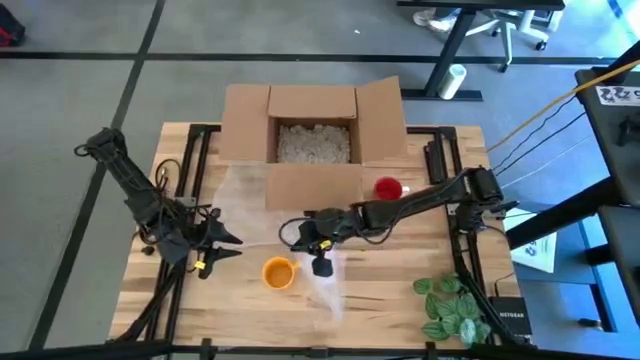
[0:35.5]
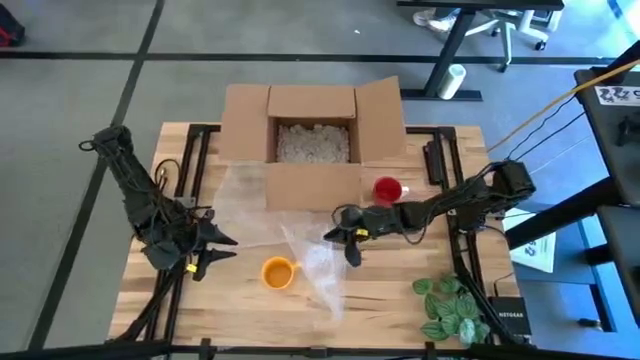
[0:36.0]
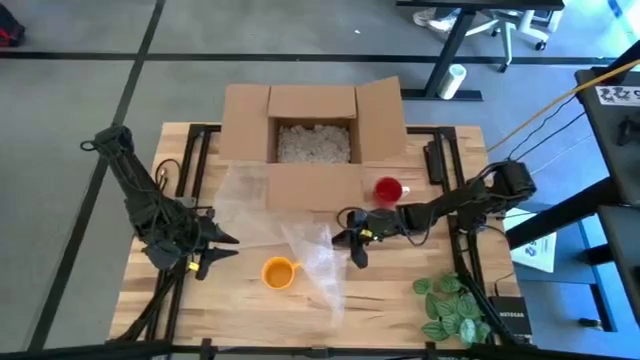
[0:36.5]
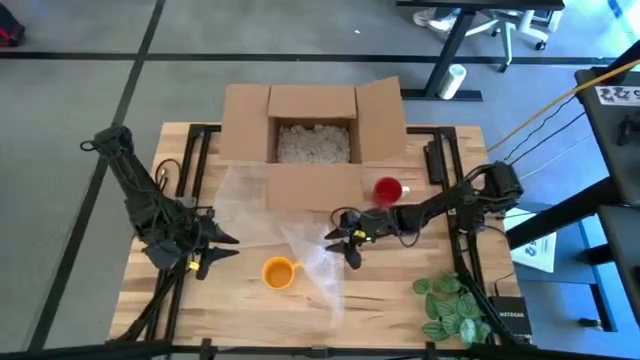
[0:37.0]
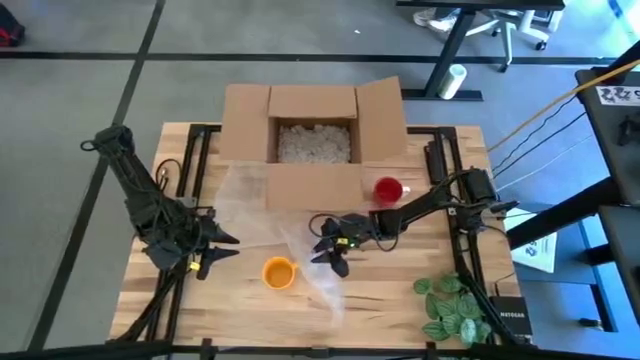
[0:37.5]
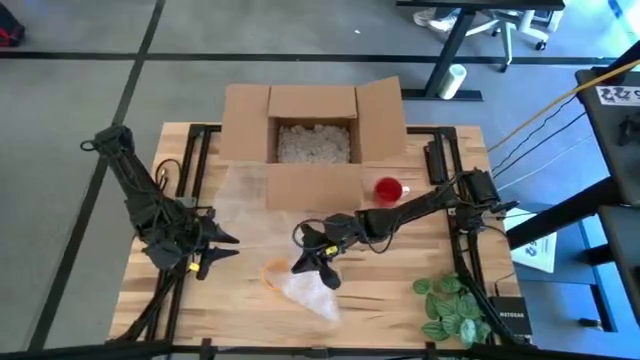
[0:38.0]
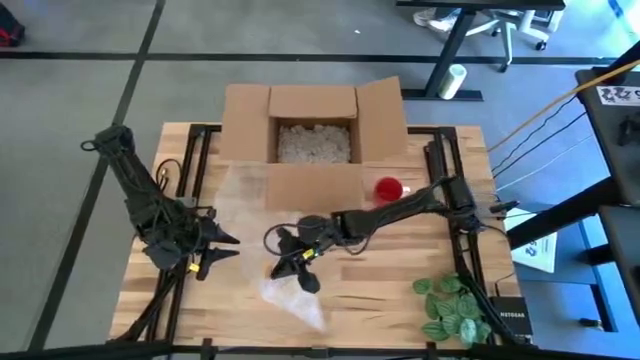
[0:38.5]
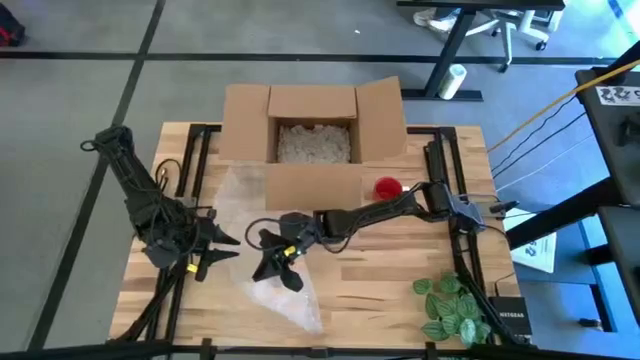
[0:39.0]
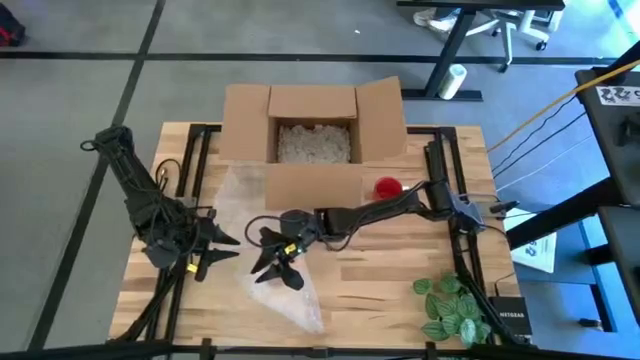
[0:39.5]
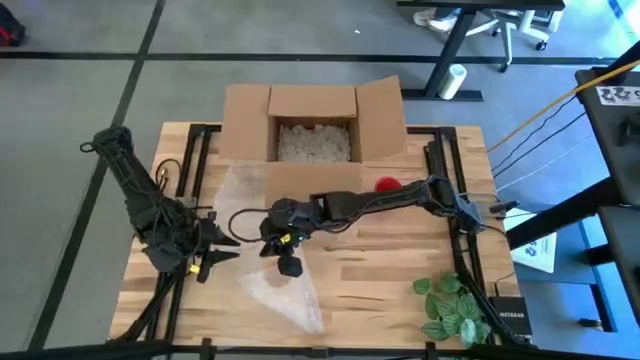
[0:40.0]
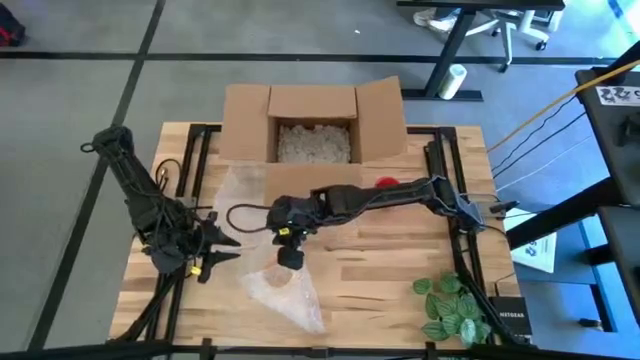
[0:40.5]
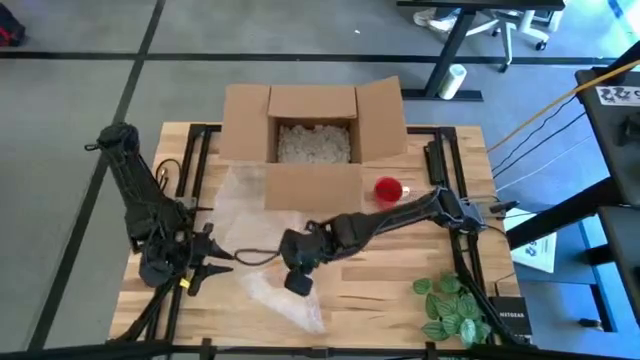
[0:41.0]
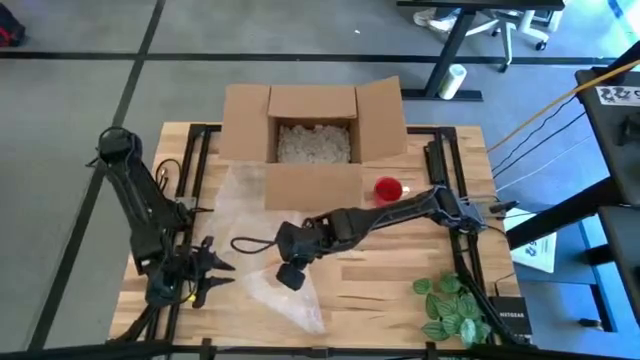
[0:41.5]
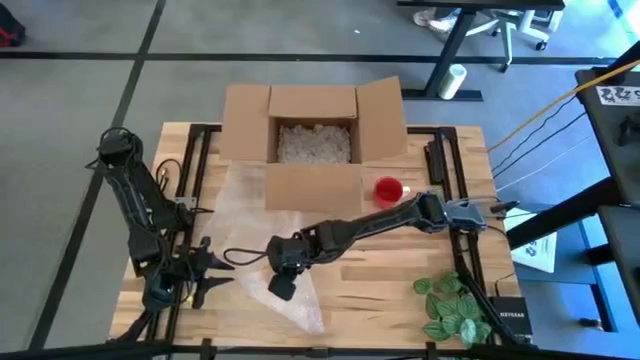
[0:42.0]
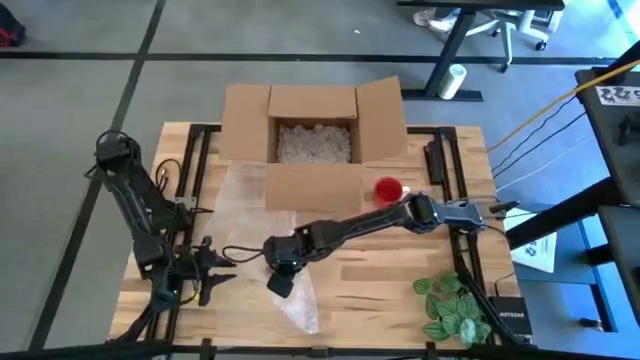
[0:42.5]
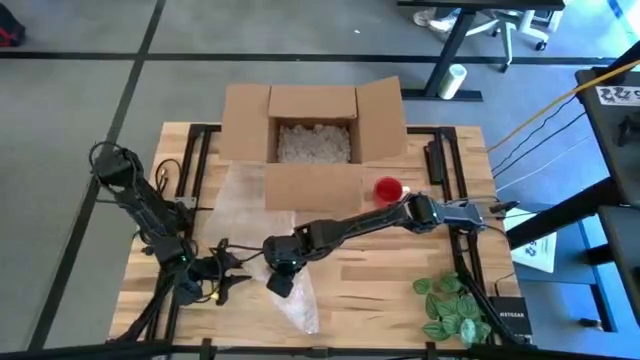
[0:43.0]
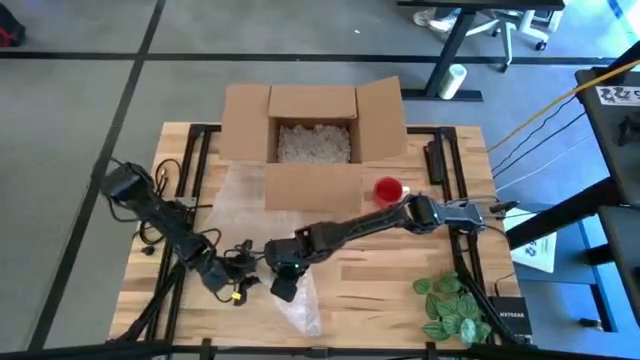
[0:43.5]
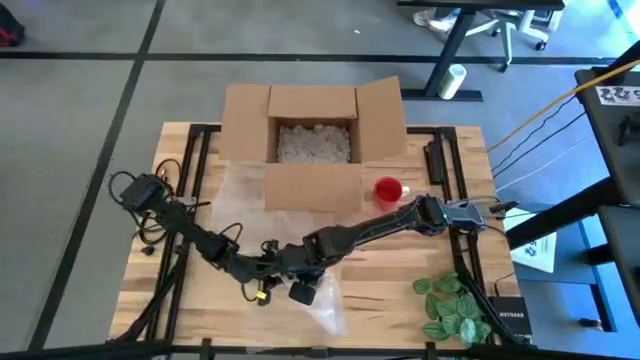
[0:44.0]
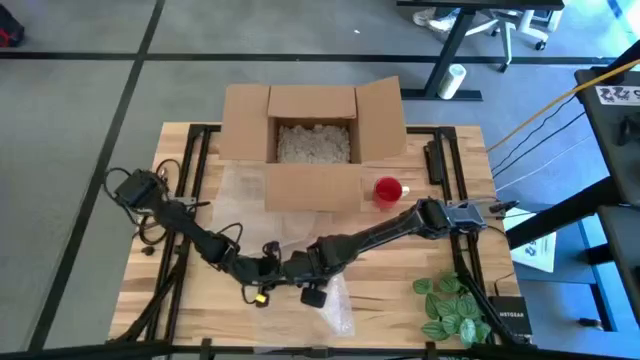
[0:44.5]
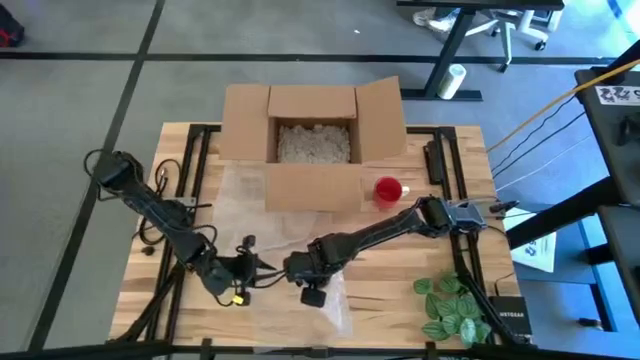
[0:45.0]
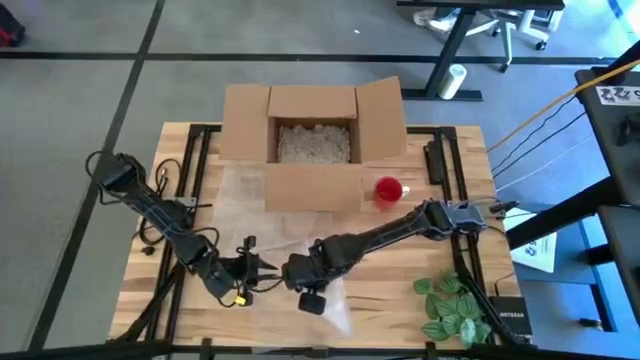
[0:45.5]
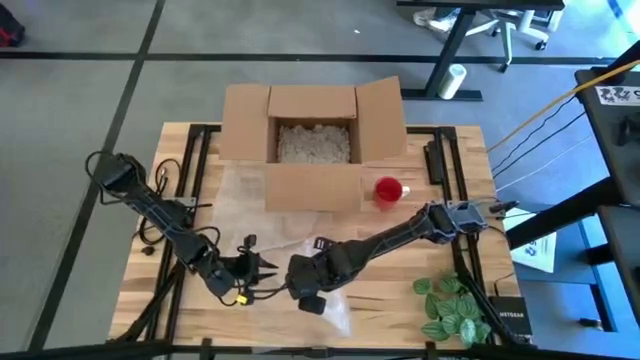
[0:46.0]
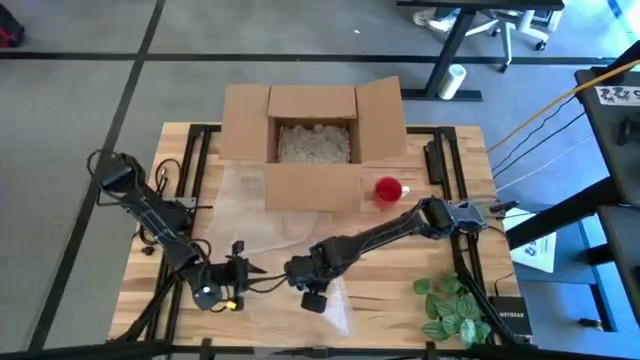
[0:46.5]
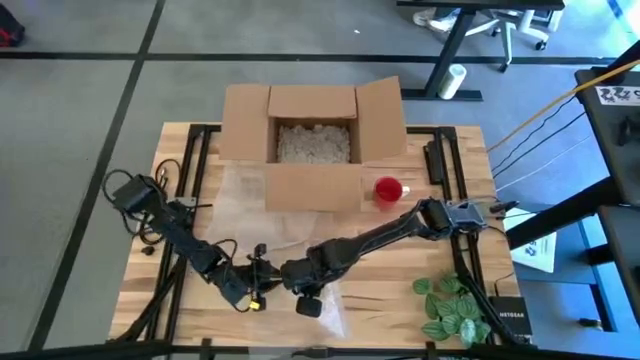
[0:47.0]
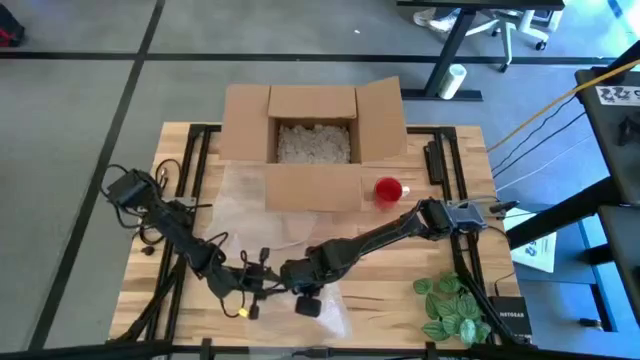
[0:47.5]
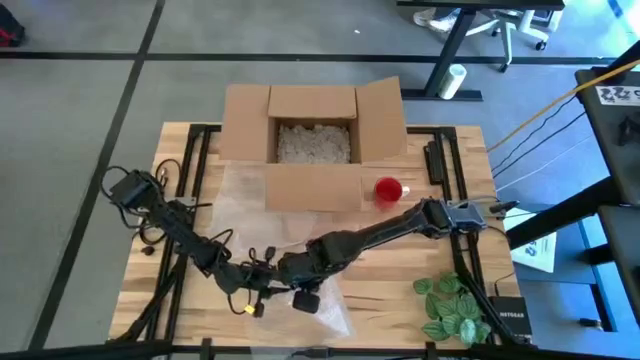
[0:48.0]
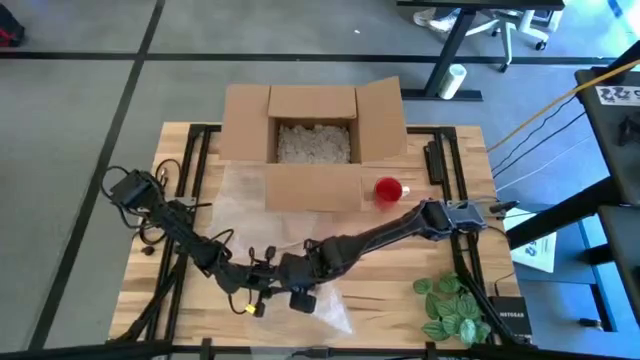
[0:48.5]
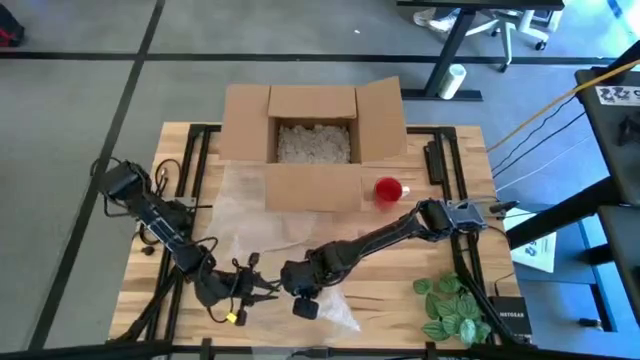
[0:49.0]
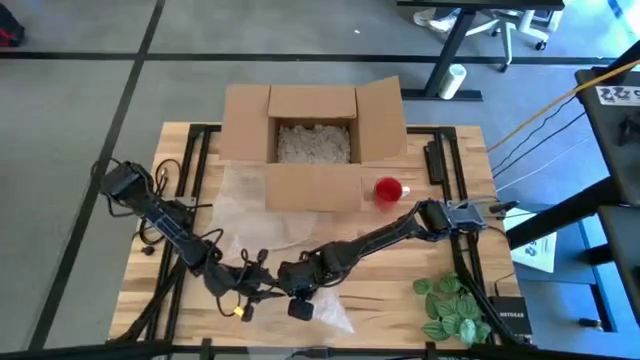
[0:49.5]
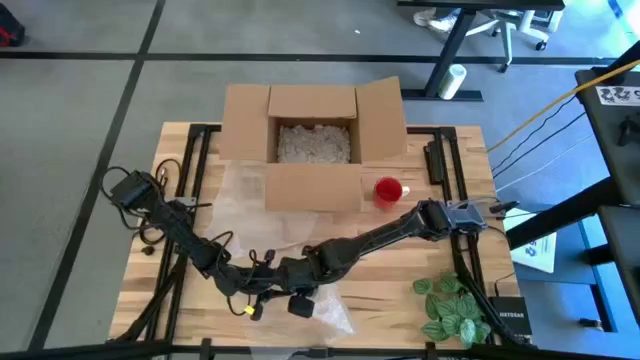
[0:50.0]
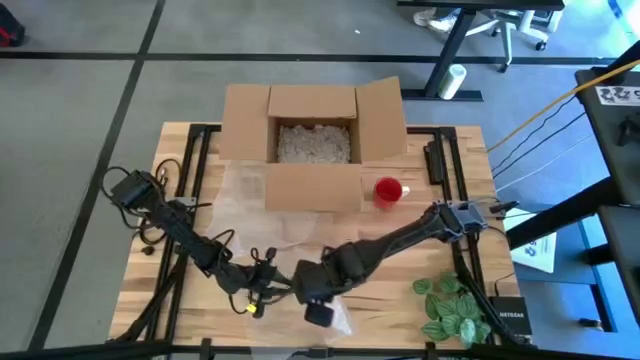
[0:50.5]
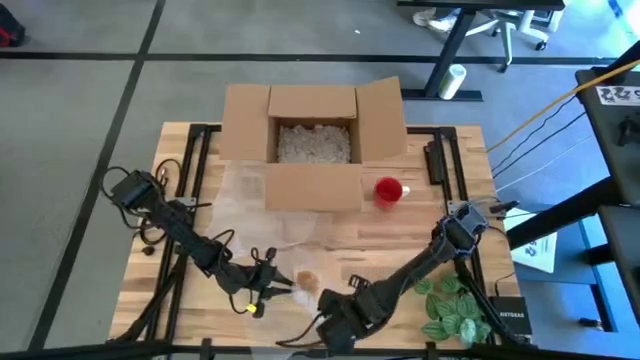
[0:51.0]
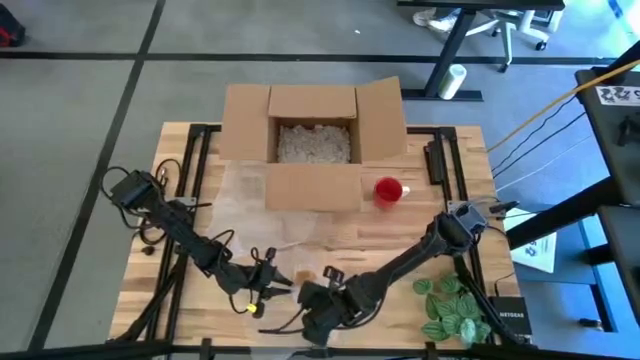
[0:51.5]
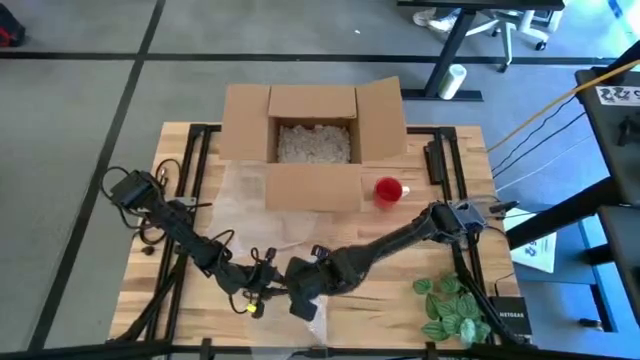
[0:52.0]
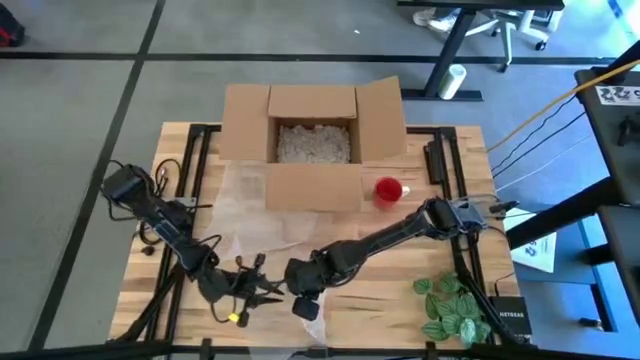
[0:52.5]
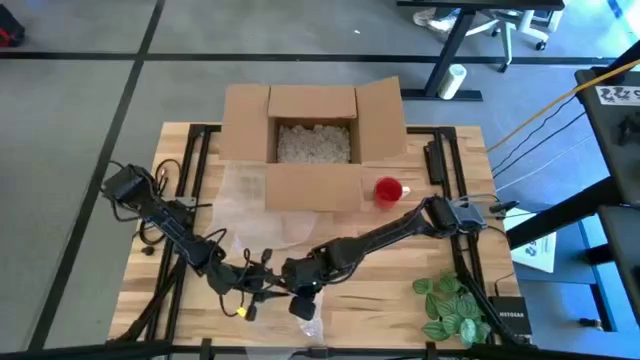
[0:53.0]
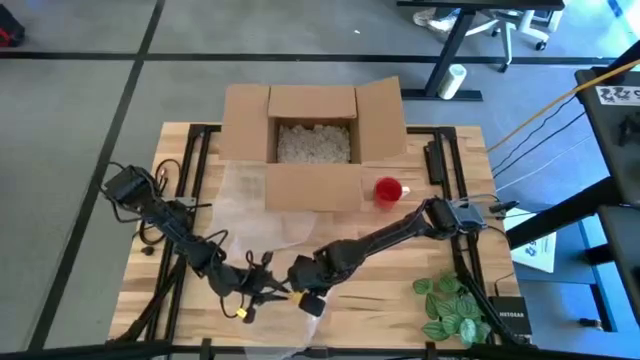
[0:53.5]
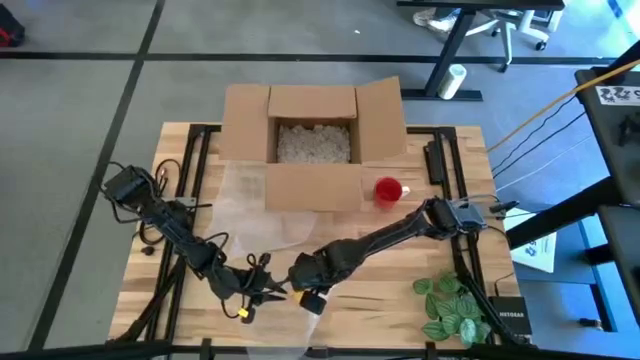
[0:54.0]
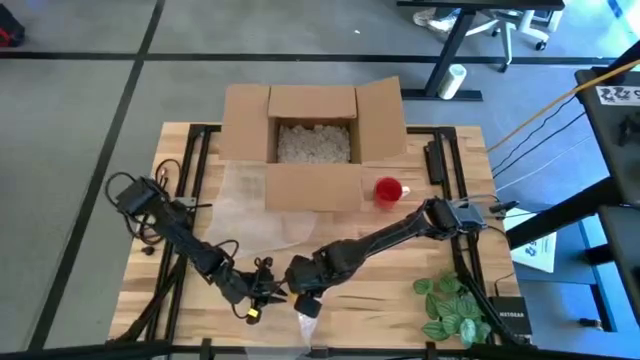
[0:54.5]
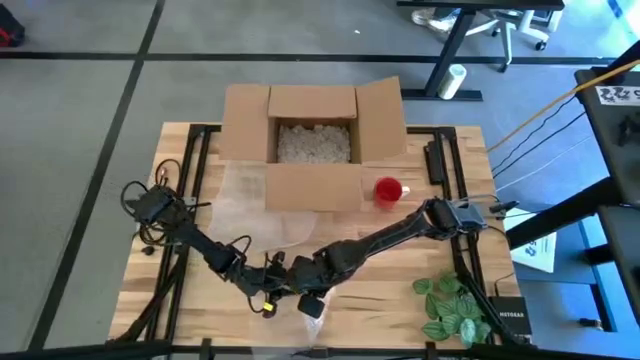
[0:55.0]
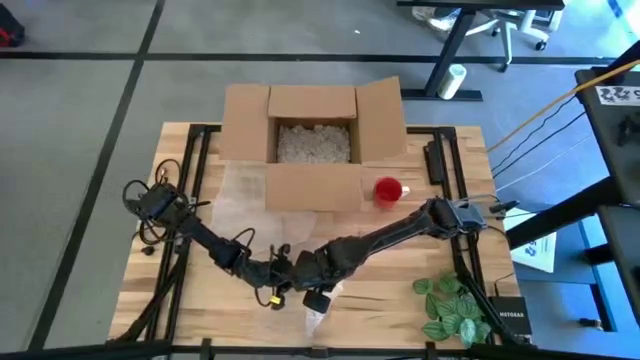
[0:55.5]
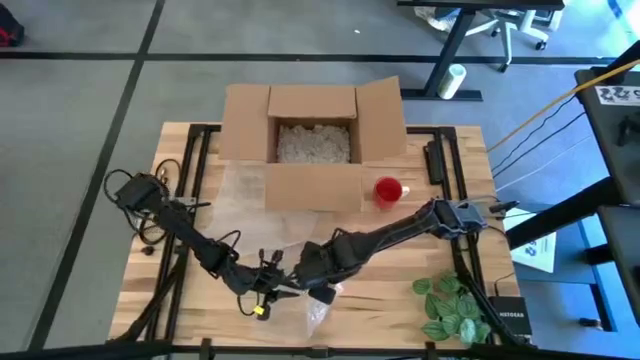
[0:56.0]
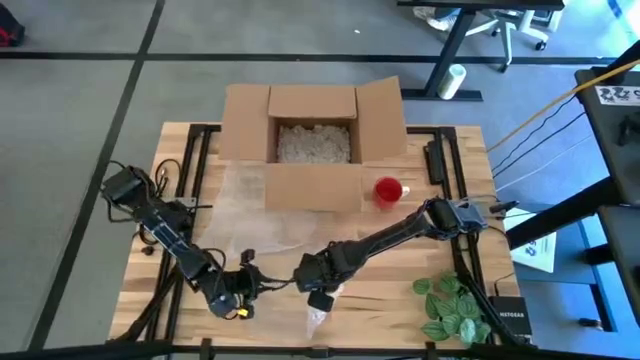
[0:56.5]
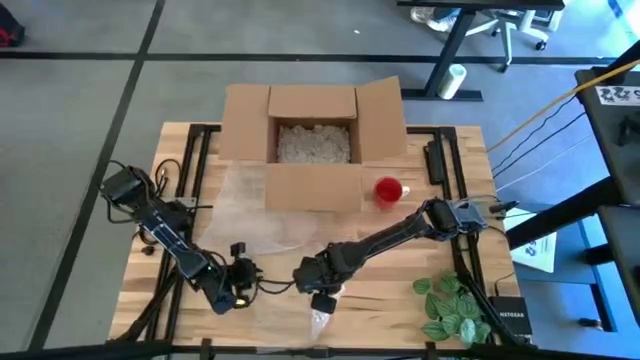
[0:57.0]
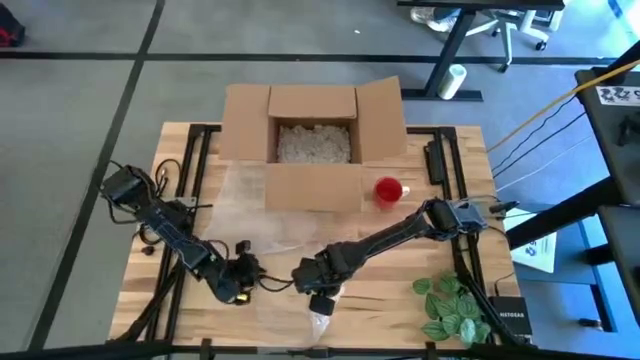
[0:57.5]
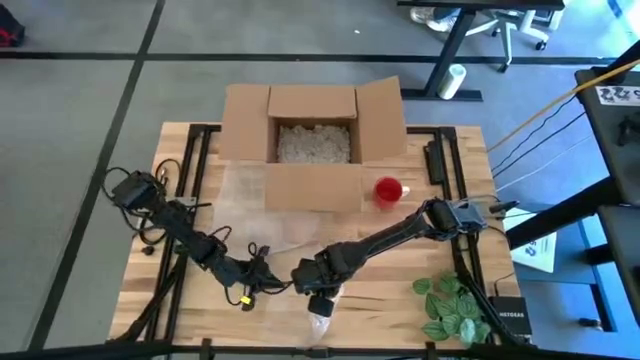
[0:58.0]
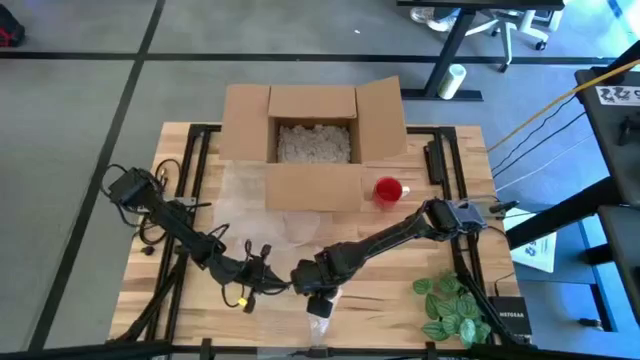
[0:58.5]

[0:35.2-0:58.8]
Task: wrap mug
Wrap the yellow mug using the bubble wrap
